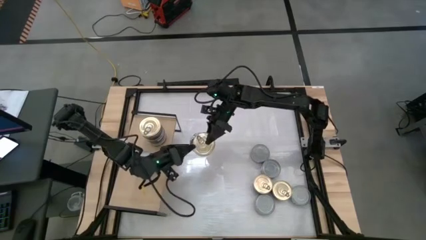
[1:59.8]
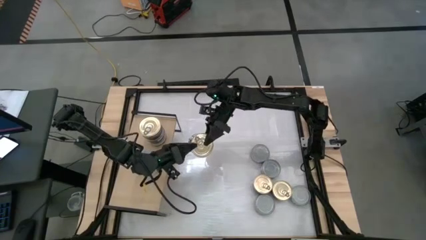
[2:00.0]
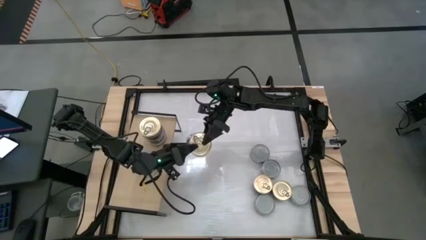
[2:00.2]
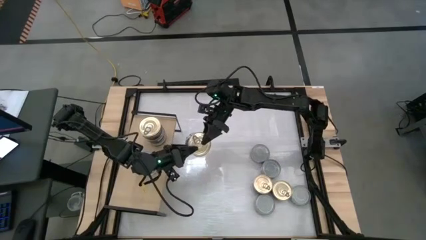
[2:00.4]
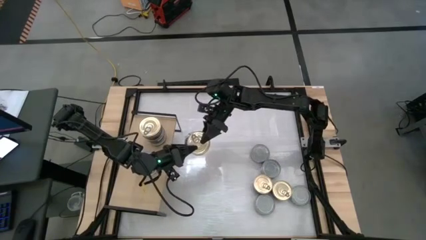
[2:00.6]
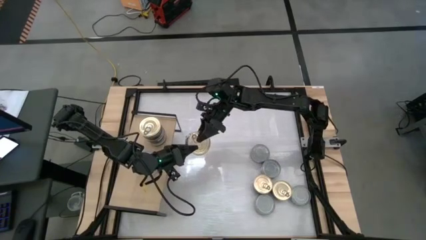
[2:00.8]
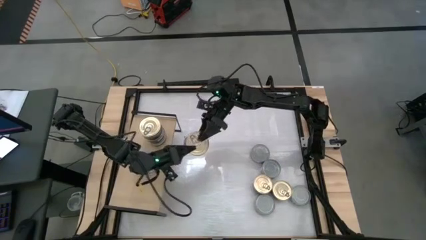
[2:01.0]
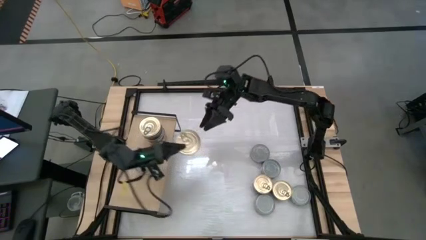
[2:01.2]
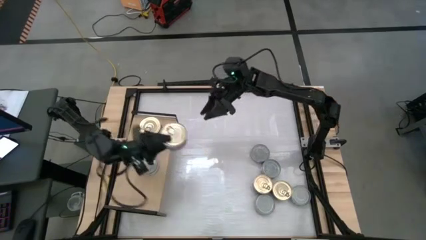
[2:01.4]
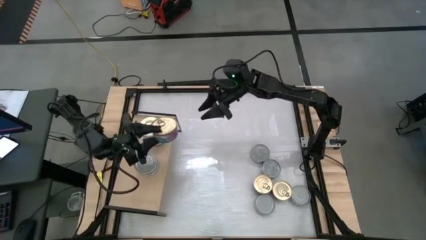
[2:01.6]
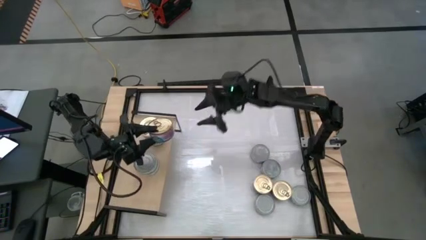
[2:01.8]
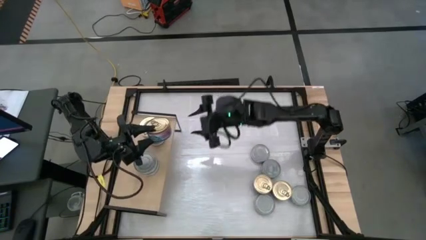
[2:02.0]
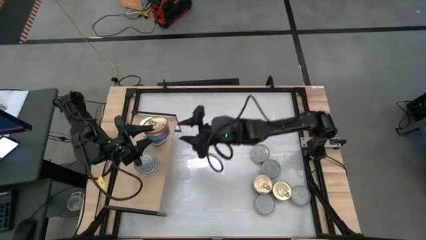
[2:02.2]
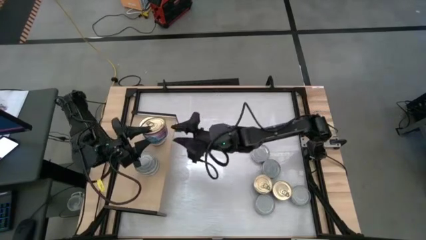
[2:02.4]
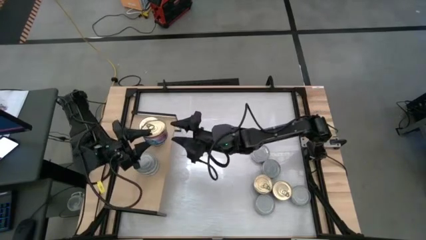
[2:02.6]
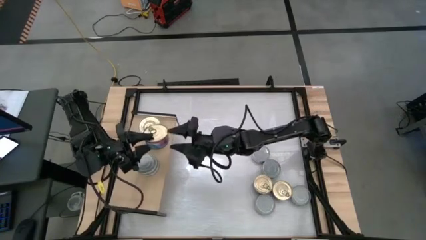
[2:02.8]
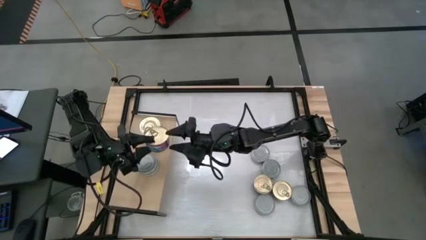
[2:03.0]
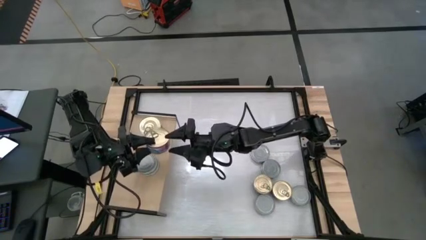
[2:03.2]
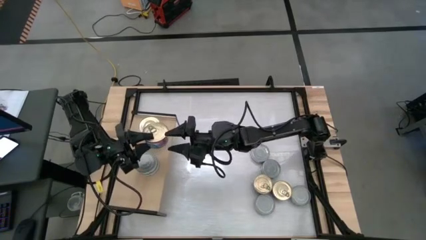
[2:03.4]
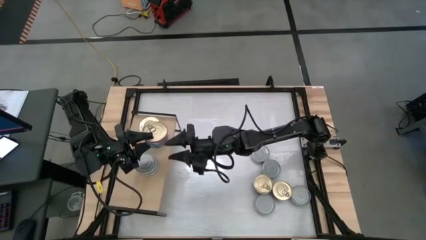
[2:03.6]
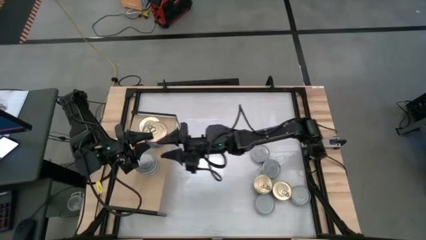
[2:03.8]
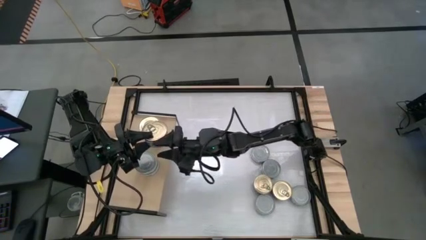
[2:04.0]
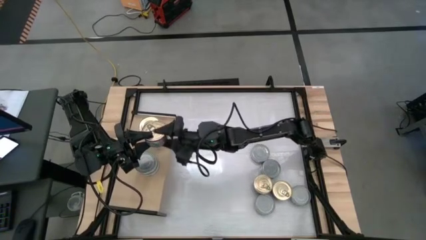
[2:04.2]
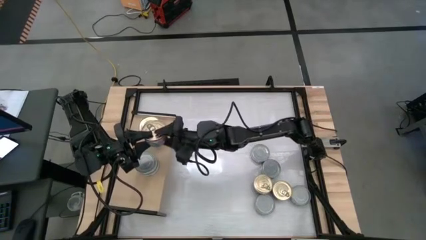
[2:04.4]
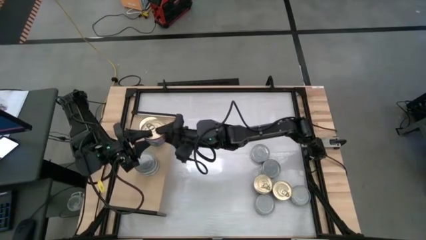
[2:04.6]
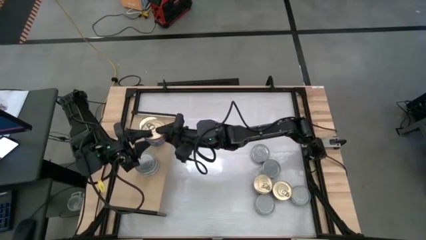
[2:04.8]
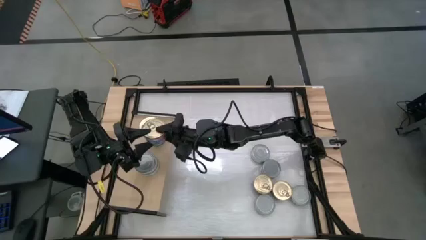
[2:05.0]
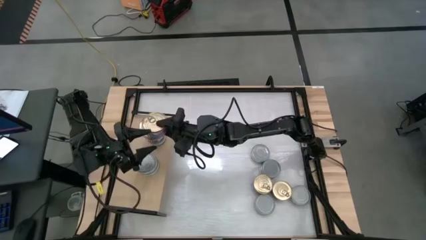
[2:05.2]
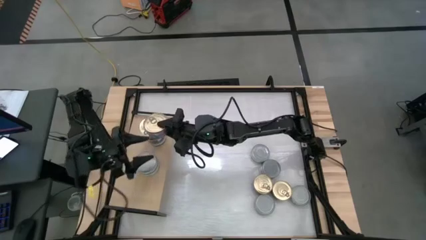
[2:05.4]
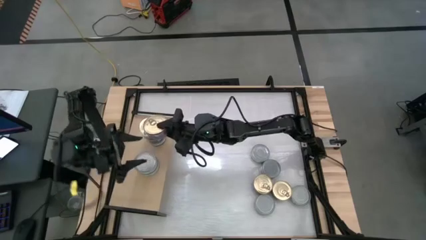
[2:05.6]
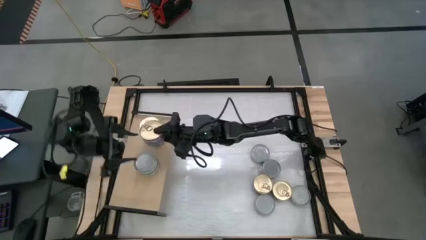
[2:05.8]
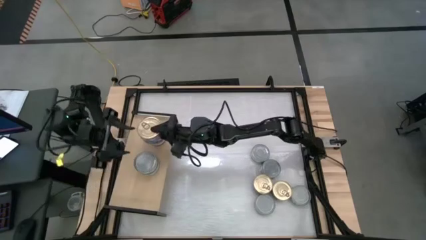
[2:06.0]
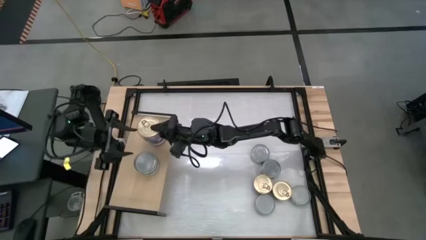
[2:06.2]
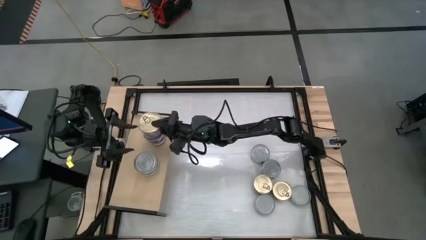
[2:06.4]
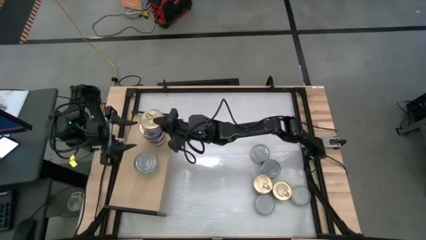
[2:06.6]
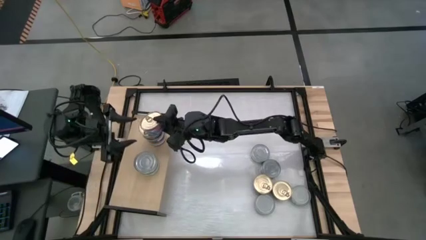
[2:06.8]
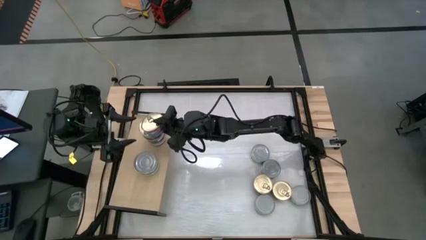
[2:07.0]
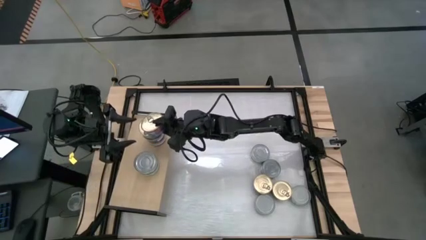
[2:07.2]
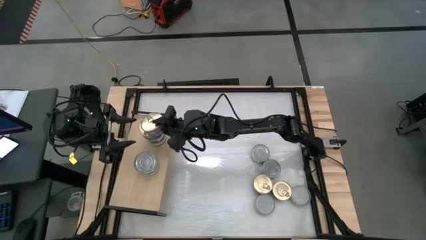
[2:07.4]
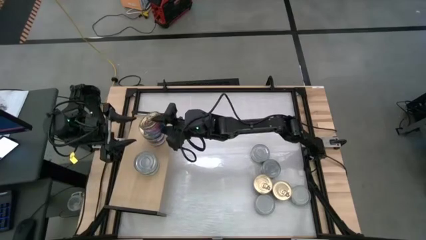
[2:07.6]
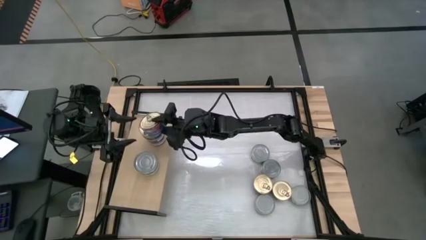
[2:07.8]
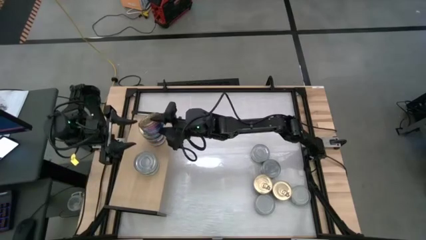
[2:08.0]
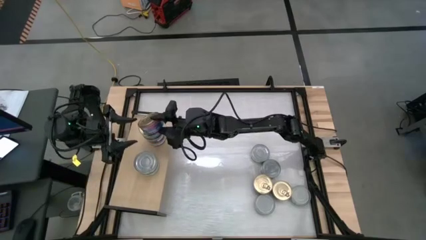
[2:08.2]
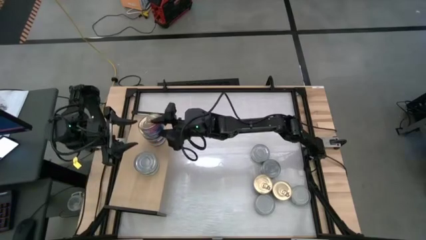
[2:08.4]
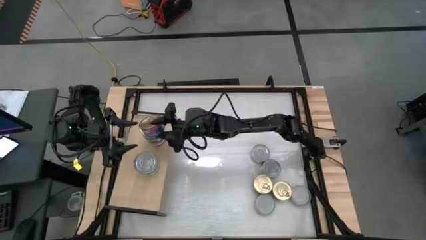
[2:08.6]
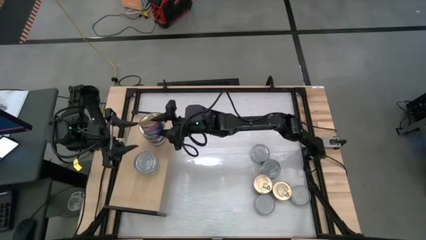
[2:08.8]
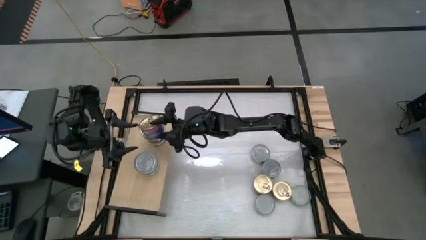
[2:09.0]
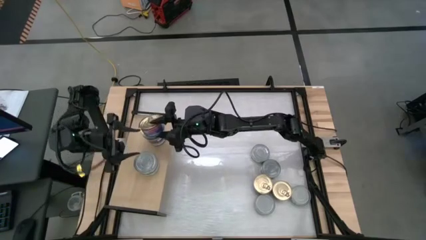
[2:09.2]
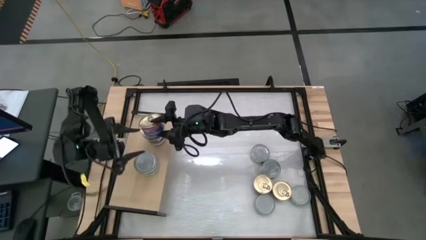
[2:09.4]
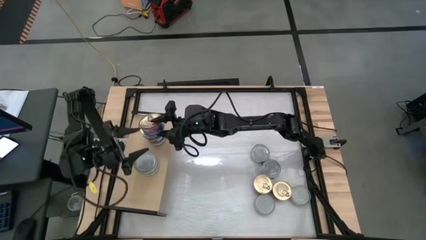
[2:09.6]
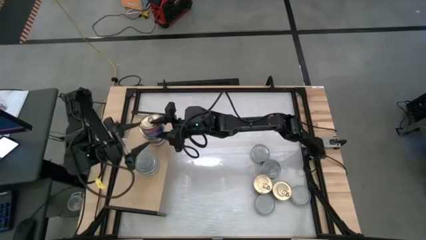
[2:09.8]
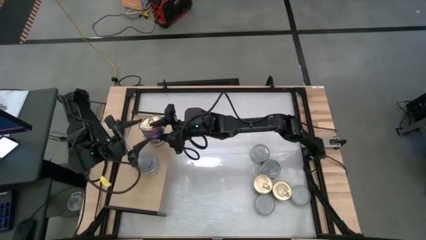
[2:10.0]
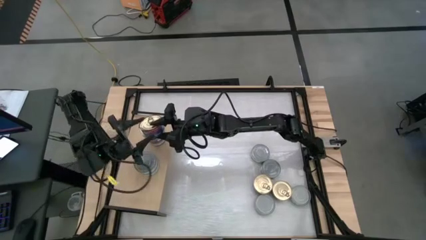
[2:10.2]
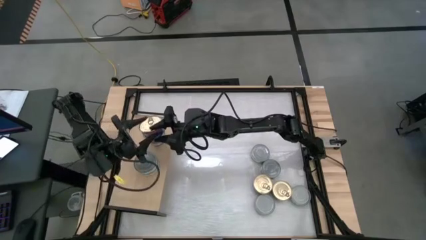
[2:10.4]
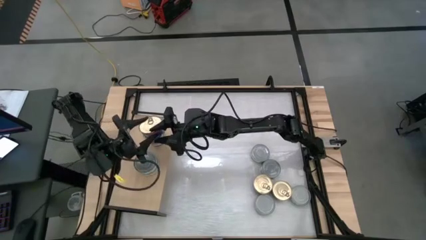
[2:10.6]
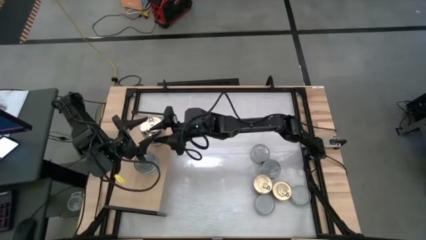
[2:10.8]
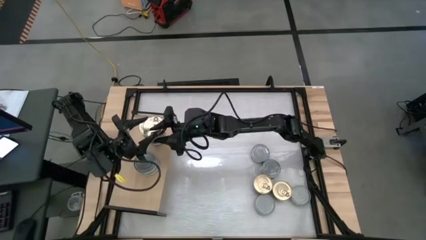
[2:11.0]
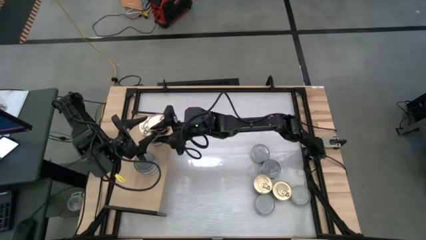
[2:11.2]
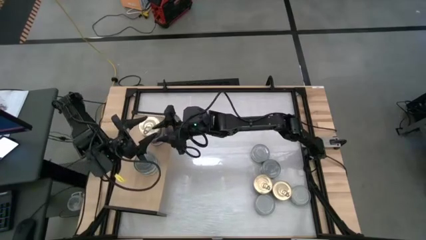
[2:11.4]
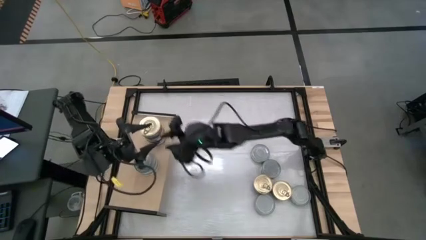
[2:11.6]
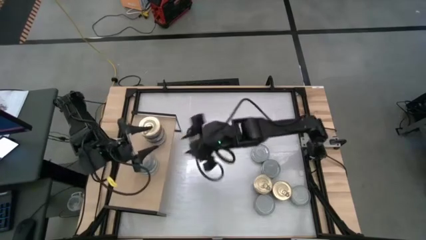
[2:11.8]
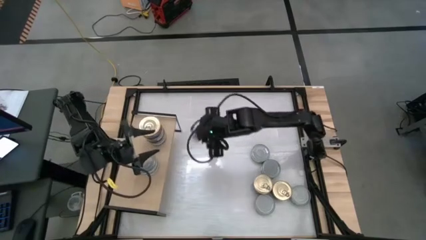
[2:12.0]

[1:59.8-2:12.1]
Task: Stack canned seafood by type on shelf
Stack the blue tuna can on top of the blue tuna can on the shelf

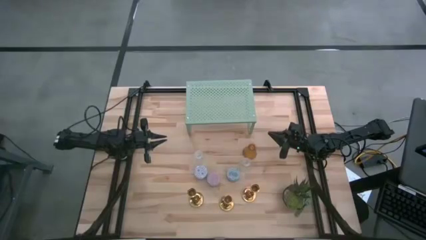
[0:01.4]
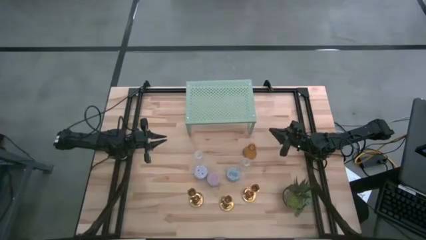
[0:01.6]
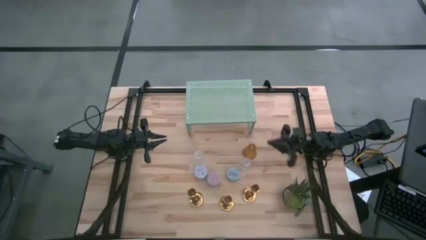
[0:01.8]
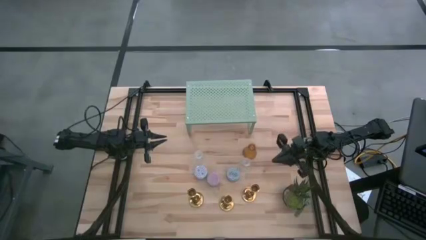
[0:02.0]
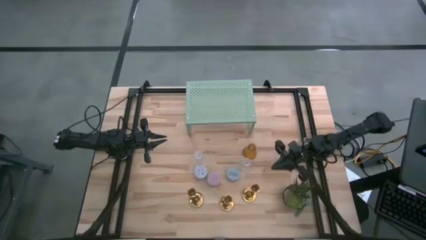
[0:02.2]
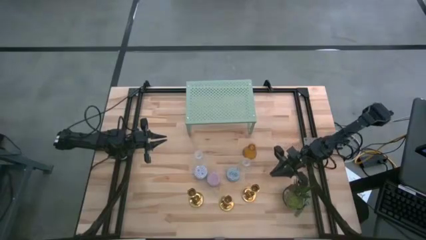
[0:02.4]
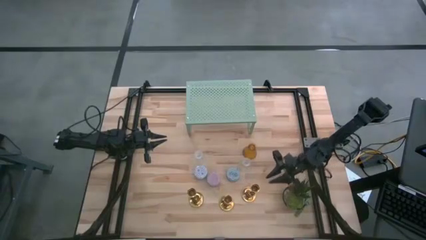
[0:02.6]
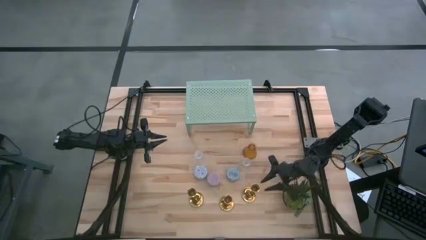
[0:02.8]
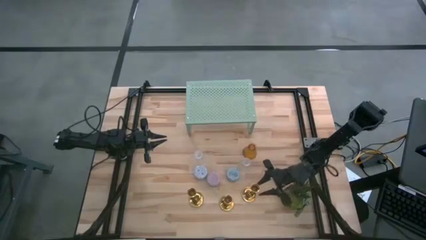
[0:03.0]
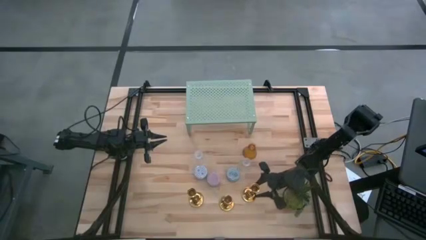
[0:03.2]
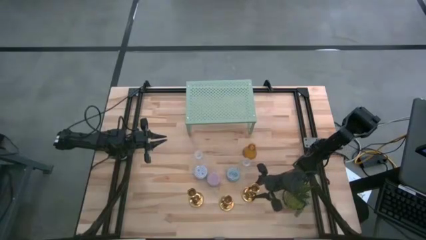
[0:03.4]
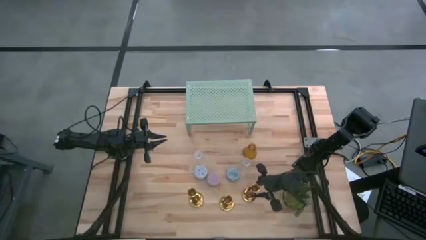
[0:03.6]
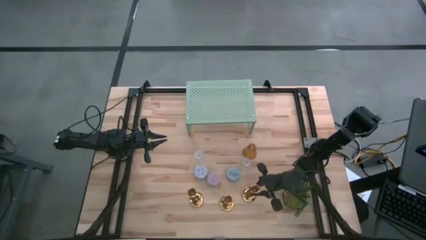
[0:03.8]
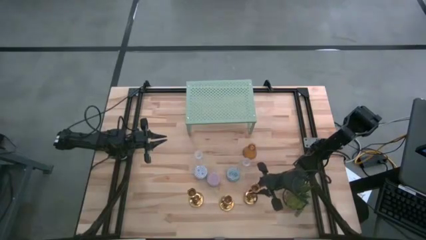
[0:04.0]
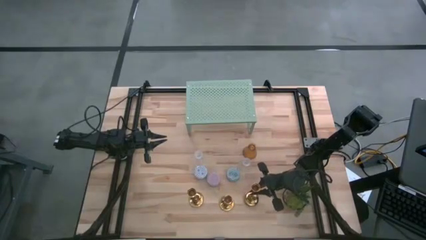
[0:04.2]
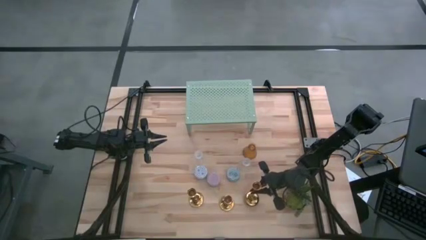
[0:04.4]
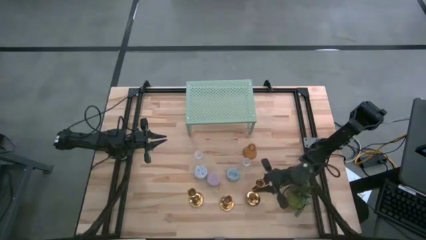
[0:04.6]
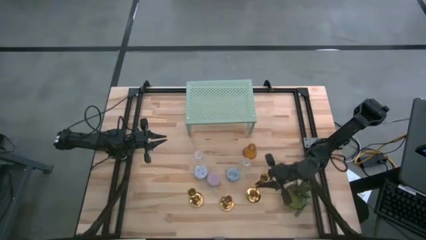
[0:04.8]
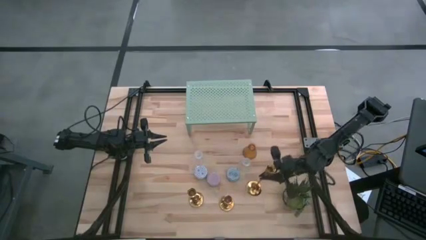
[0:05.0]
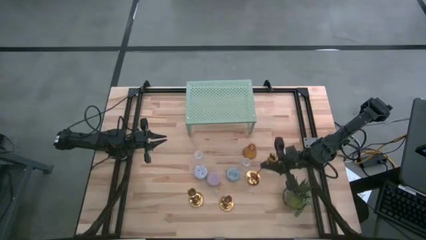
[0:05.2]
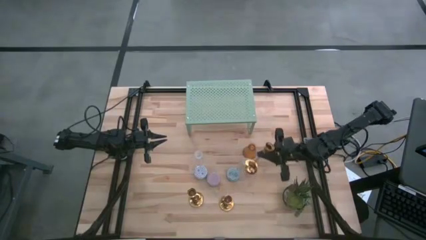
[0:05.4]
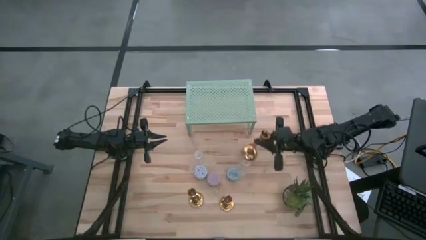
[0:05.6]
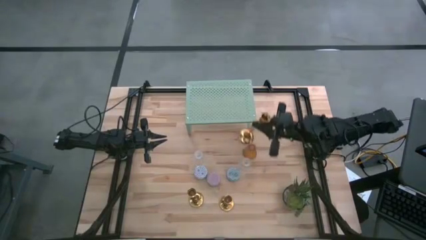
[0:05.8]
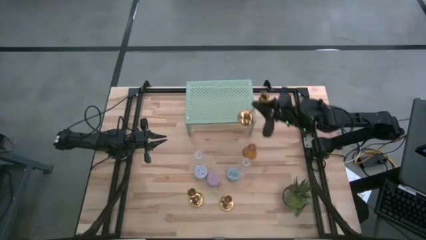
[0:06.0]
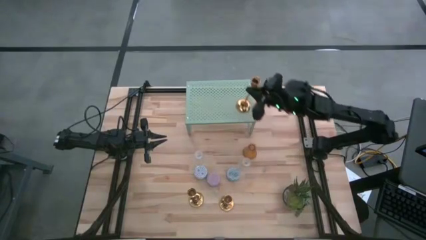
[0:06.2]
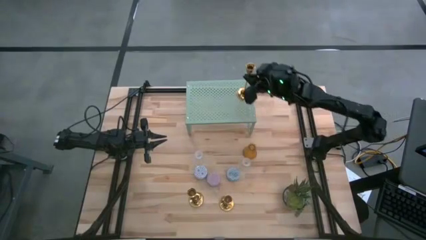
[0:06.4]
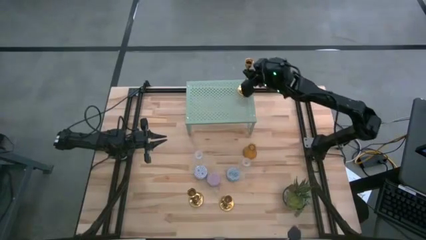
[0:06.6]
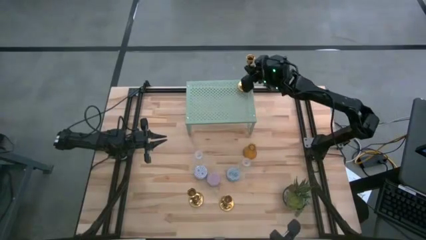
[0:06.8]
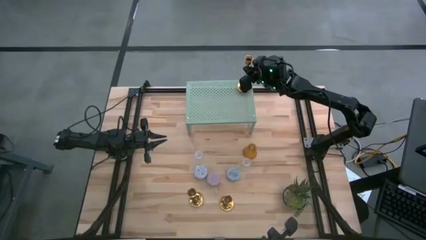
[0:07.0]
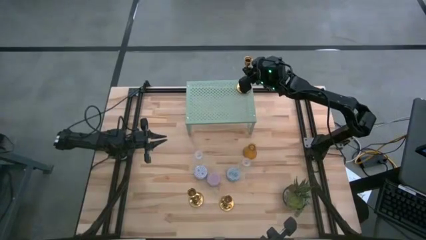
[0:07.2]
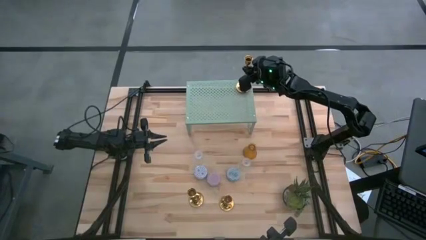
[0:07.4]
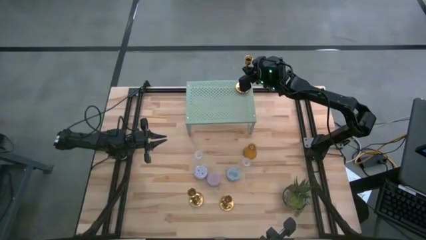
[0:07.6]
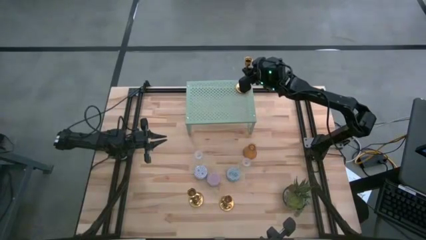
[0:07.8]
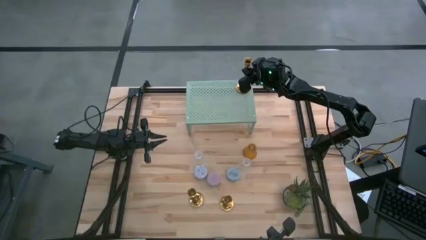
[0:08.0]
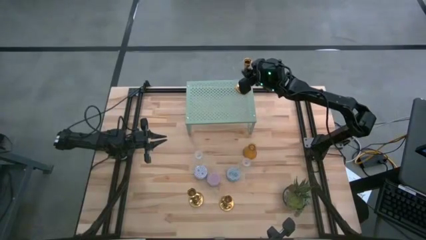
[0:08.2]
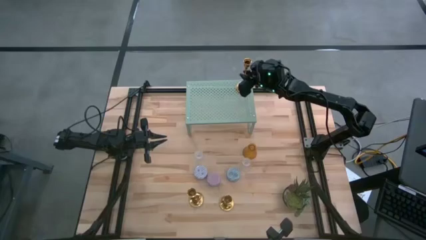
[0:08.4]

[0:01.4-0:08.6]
Task: Pick & Place candle stick holders
Put the right gold candle holder on the shelf
